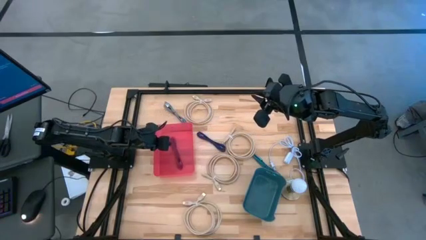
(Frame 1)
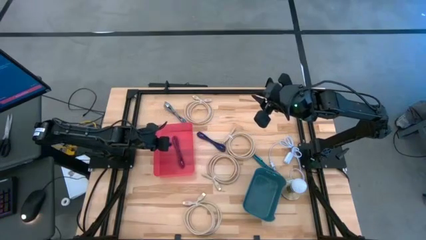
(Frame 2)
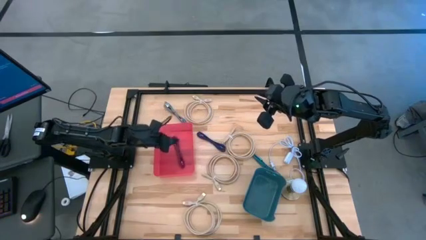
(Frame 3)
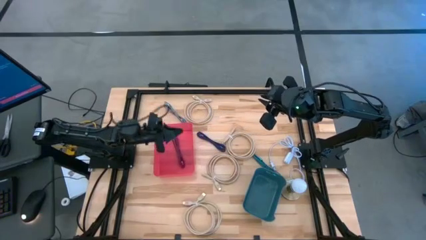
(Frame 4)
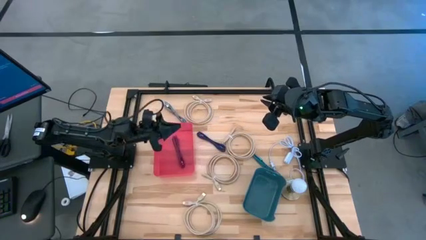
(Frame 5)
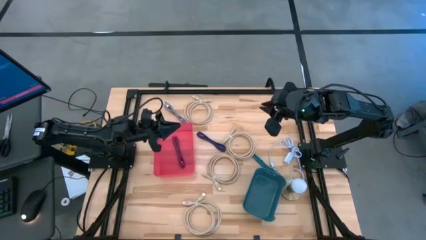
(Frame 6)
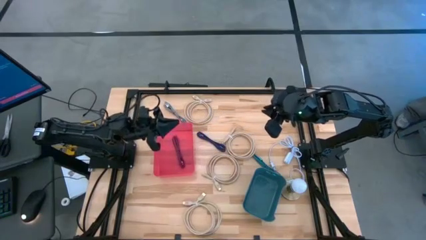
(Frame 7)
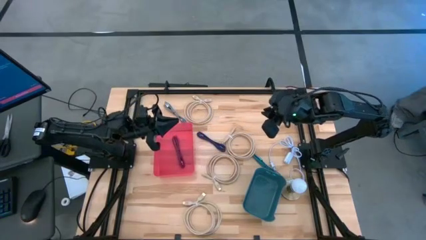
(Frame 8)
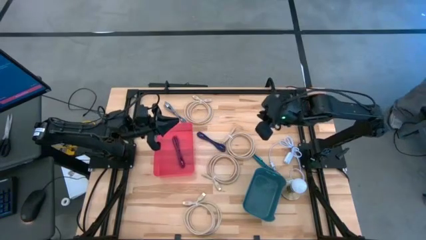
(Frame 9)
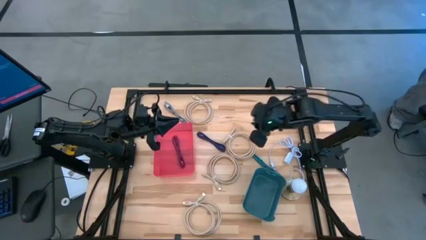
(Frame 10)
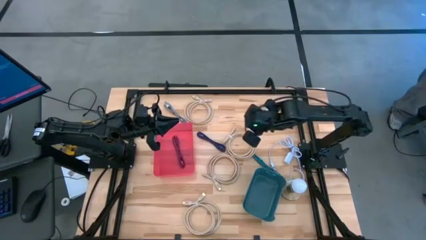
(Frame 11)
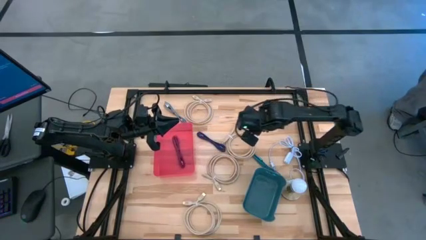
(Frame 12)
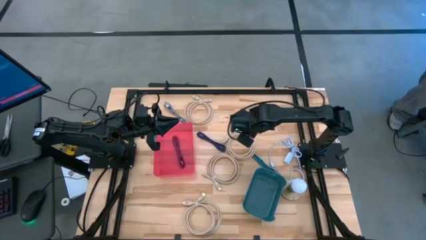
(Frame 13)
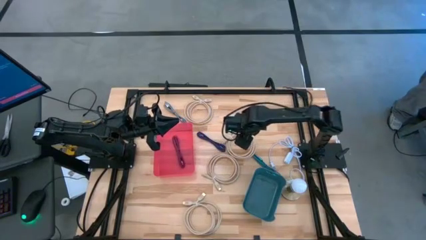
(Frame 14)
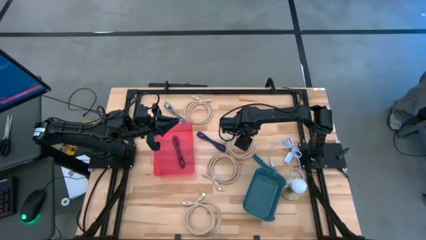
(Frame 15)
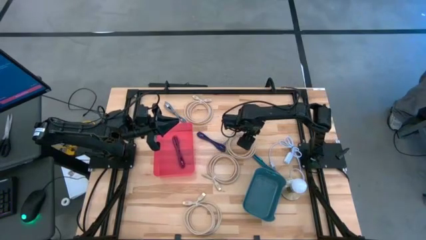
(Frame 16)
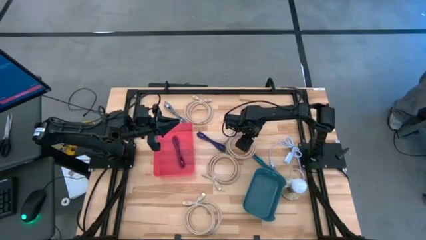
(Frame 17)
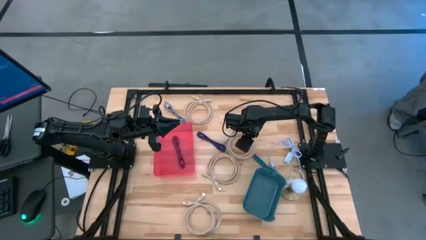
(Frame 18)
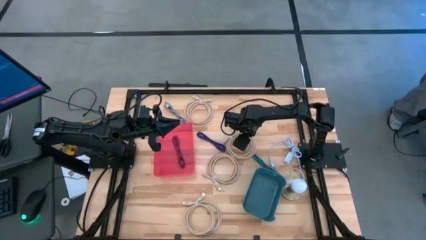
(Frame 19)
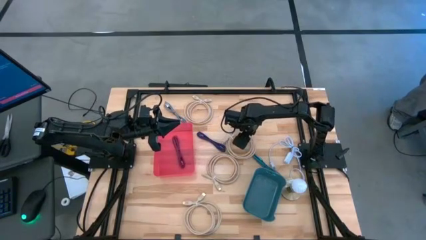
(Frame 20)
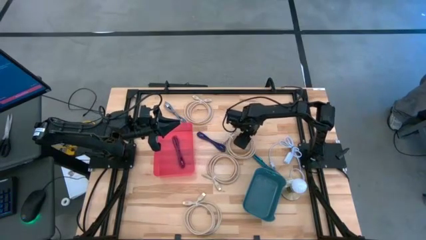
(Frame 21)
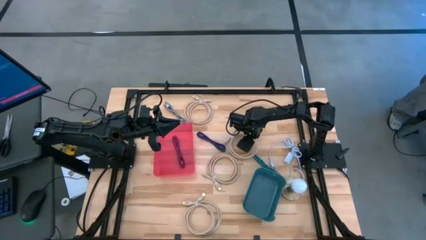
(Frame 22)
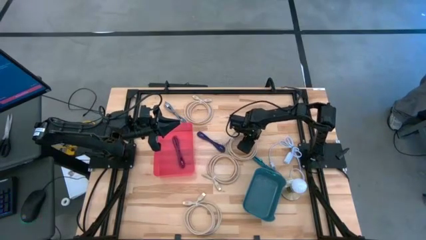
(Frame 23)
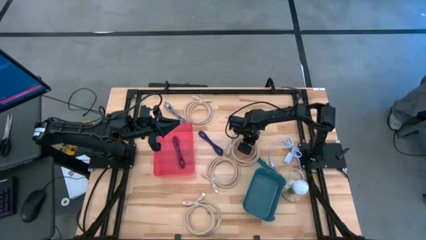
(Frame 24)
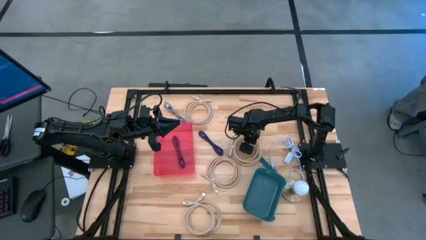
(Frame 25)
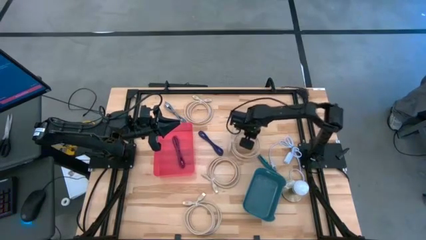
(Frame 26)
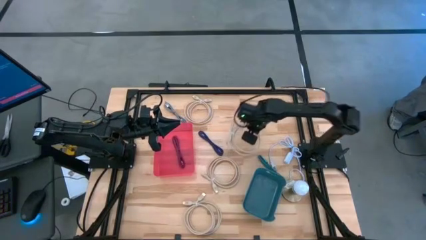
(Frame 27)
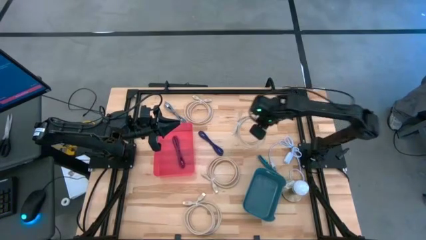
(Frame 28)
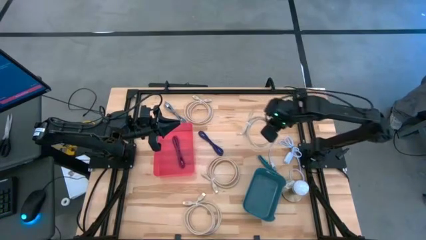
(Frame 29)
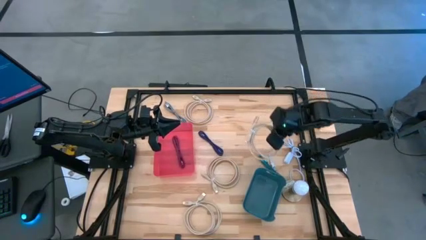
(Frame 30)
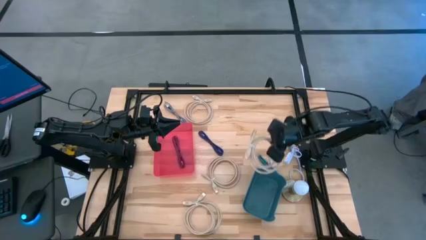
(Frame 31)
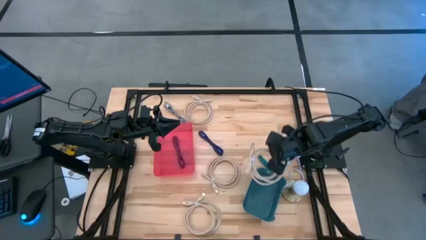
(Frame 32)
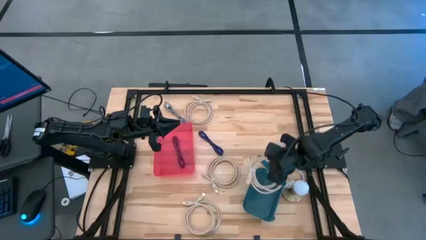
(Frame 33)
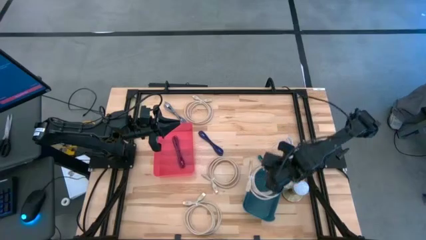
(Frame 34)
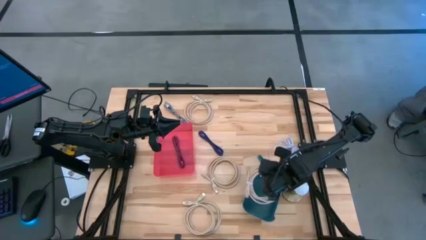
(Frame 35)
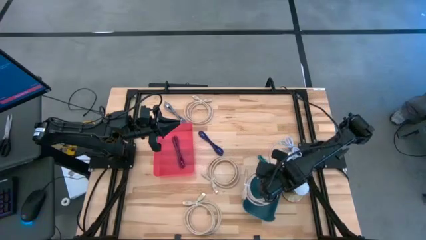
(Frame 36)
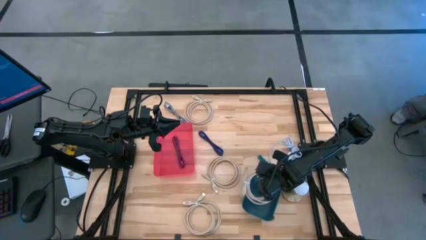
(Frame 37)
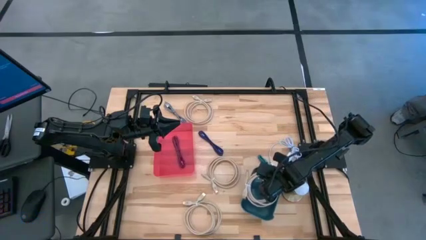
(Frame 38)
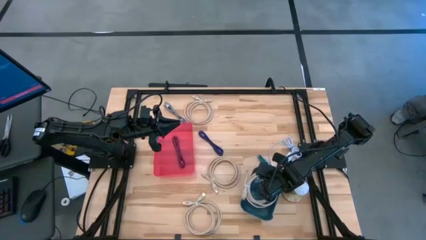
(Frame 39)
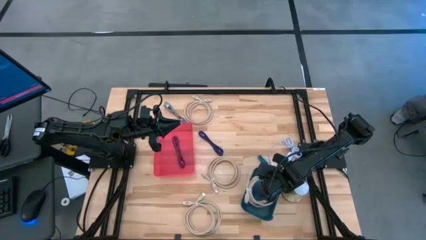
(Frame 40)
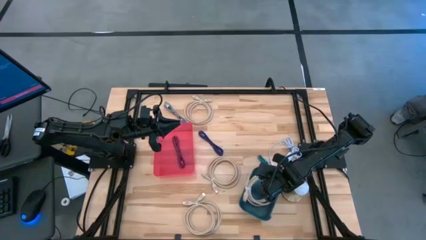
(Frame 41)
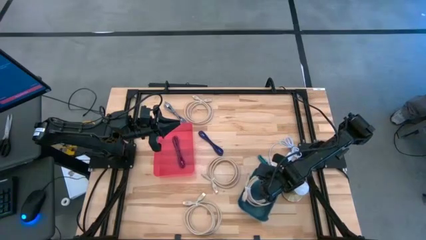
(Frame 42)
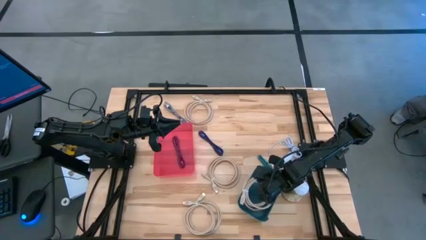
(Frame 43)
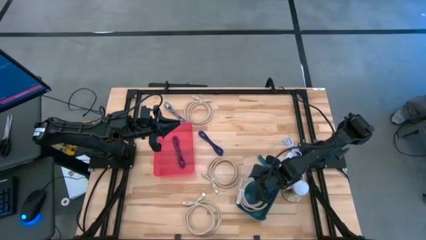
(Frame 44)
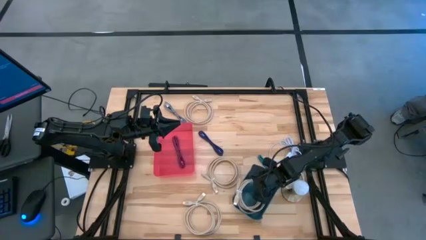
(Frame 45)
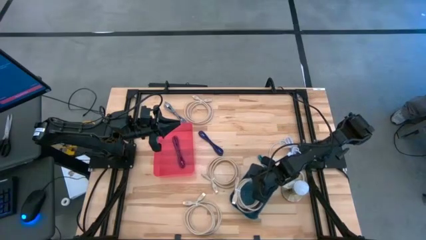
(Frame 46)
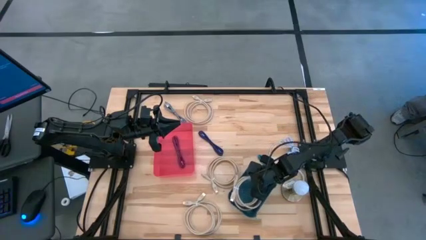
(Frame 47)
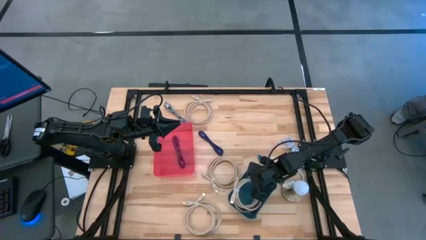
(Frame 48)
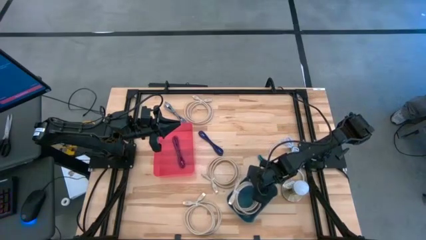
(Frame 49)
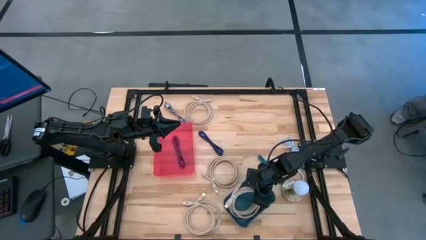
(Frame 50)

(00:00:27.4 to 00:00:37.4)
Task: Pick & Place USB Port
Put the white HDMI cable into the blue bin

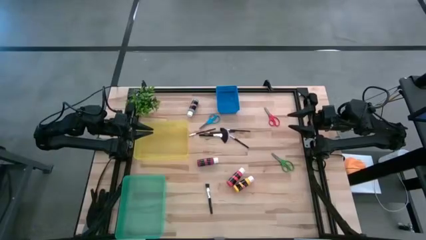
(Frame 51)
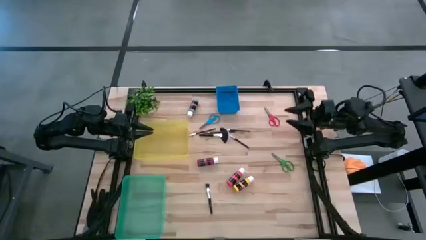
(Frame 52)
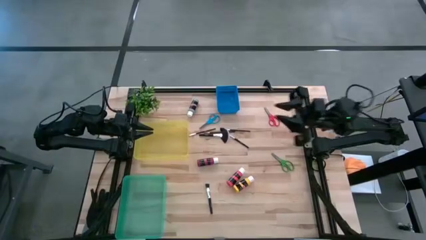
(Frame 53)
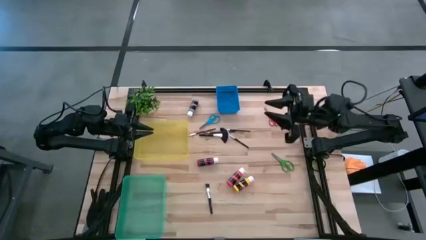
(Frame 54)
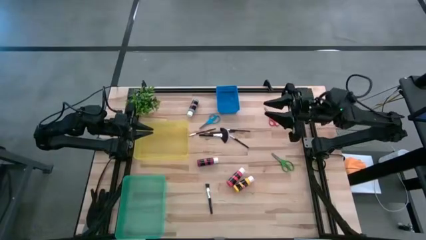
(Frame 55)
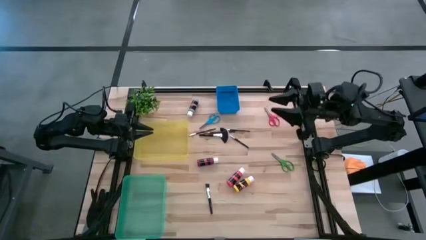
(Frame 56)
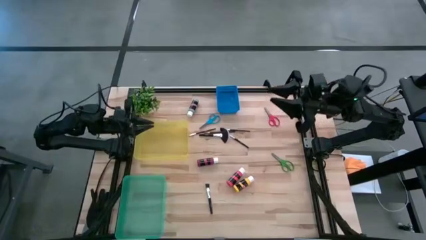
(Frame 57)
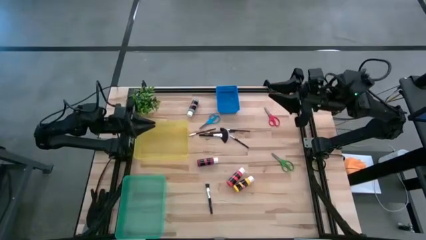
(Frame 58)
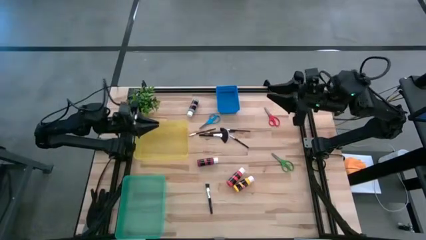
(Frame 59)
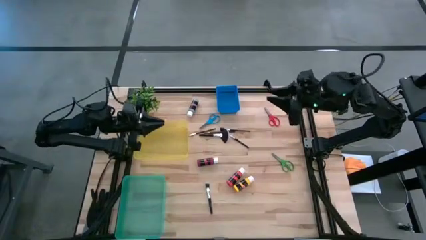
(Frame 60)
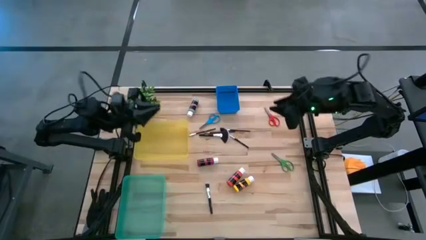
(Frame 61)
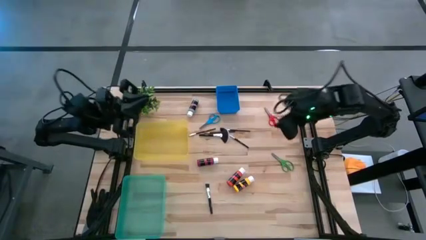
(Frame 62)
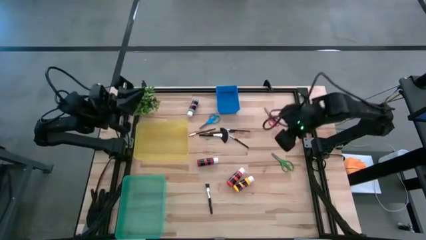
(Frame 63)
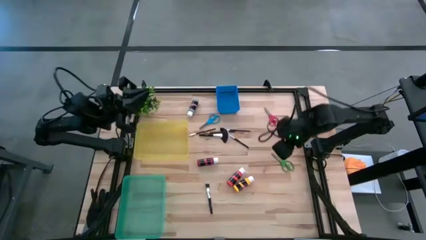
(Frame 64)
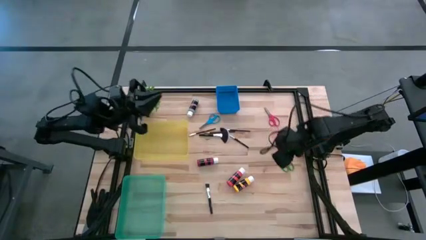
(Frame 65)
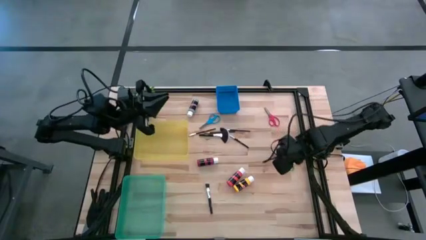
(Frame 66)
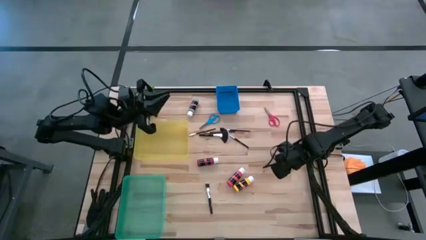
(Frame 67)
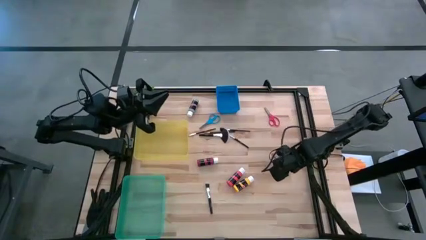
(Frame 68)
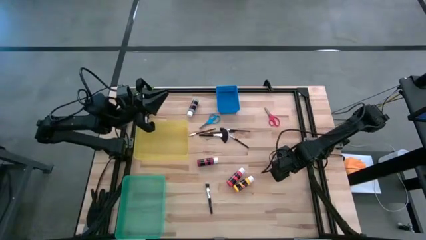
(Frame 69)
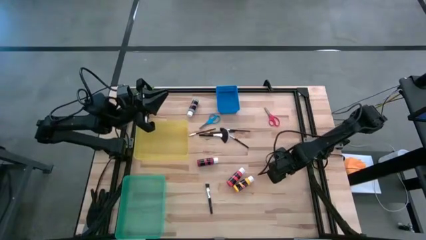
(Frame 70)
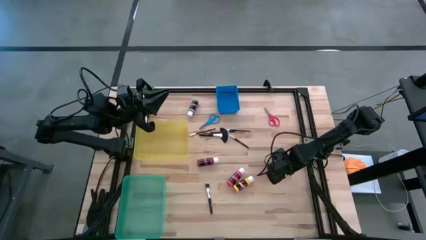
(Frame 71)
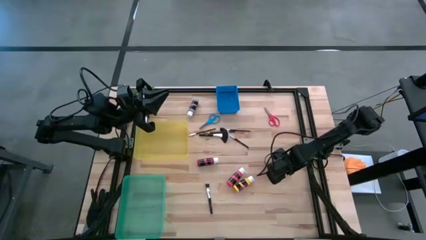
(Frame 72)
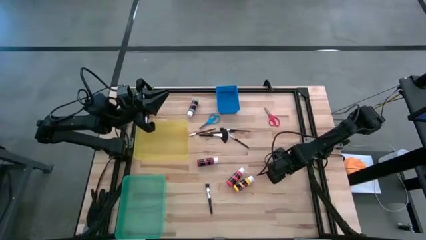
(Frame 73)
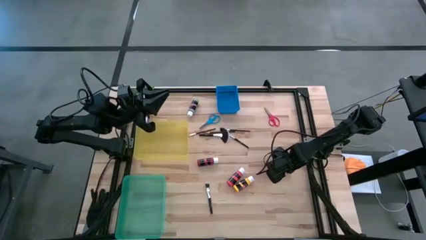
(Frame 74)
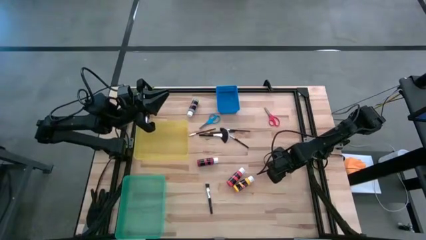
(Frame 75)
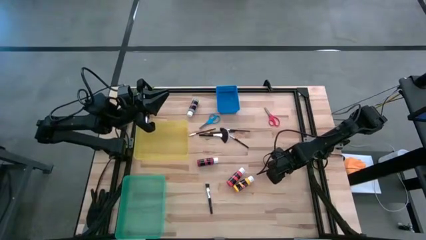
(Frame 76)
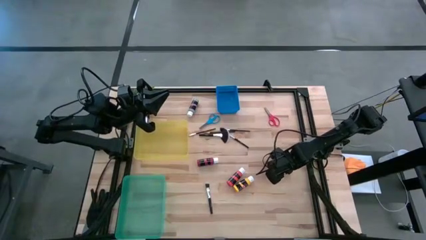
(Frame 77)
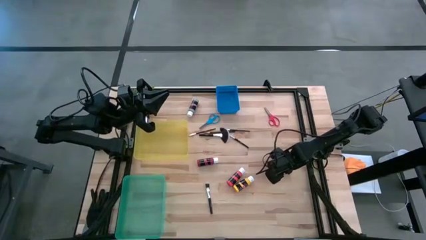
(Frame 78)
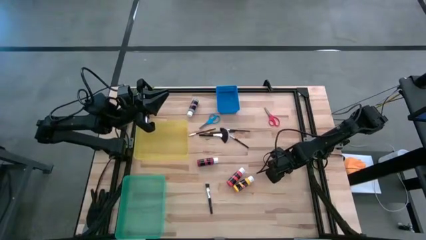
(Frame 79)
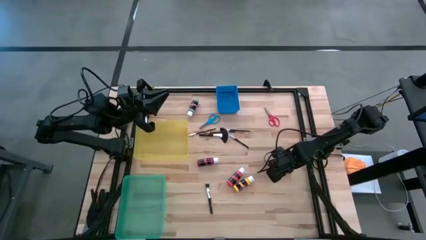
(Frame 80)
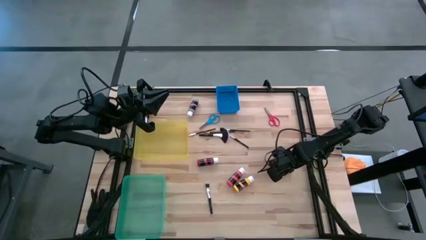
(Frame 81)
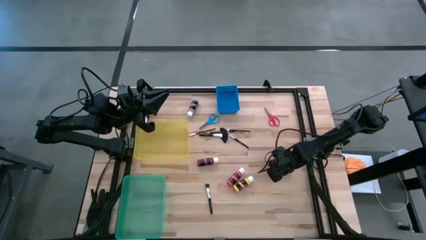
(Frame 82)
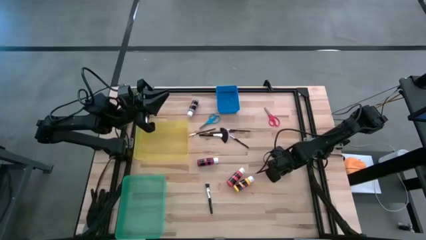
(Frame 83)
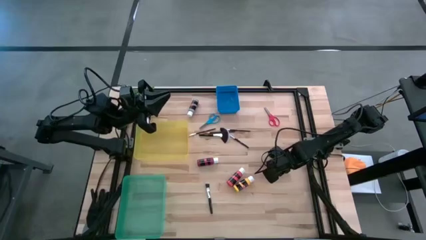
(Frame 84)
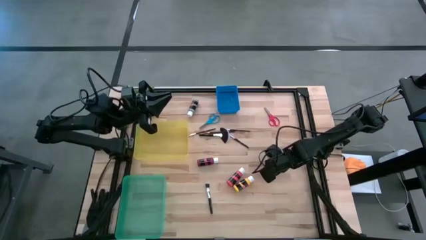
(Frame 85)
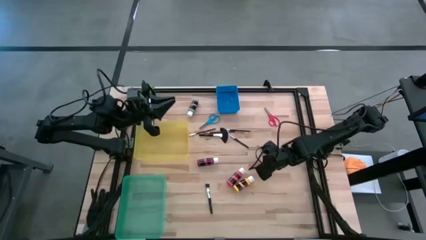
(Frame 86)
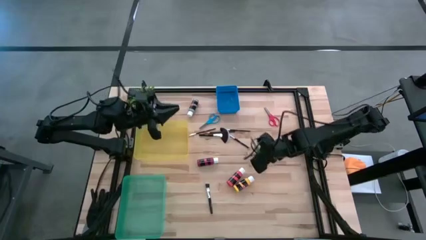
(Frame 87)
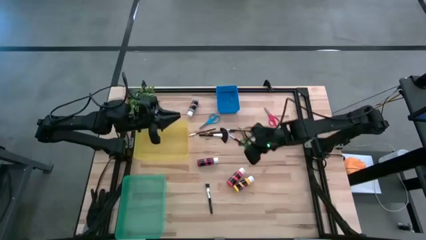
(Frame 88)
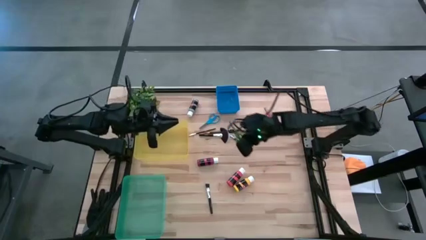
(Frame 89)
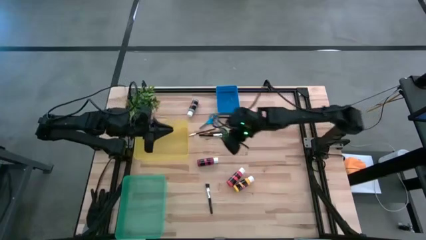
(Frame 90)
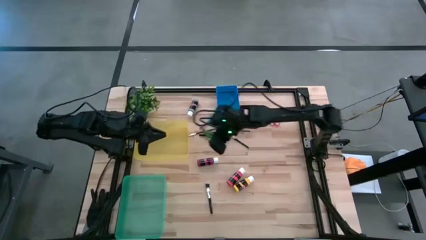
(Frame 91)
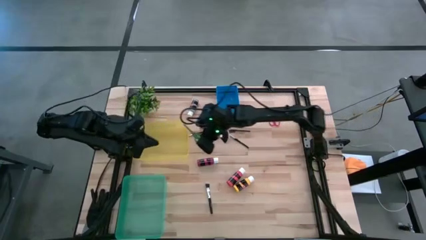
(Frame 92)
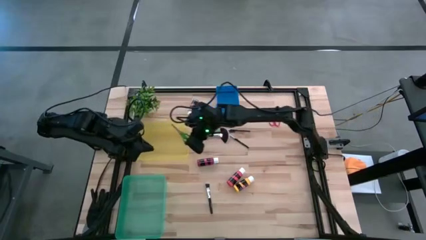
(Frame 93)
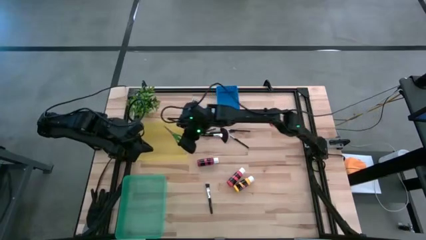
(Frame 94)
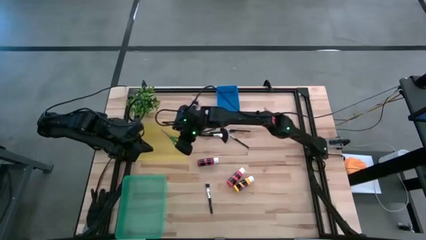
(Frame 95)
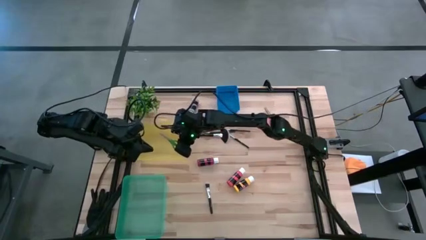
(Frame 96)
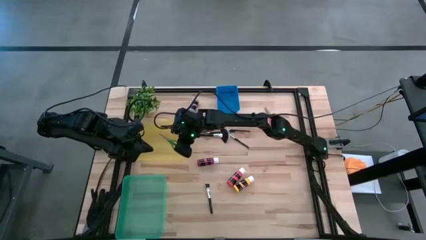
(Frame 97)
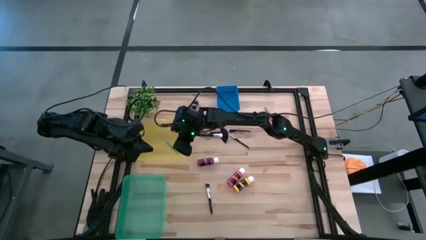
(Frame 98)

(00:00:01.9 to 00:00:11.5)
Task: Pick & Place Paint Supplies
Put the green scissors into the yellow bin
